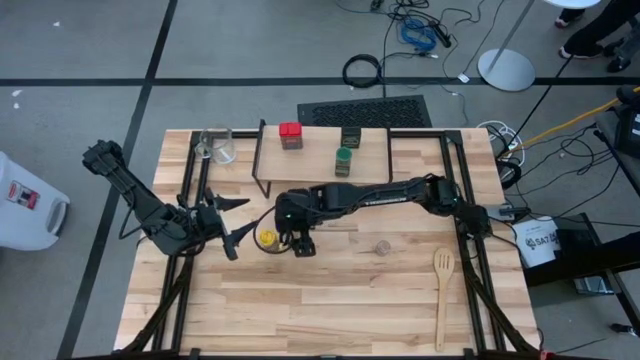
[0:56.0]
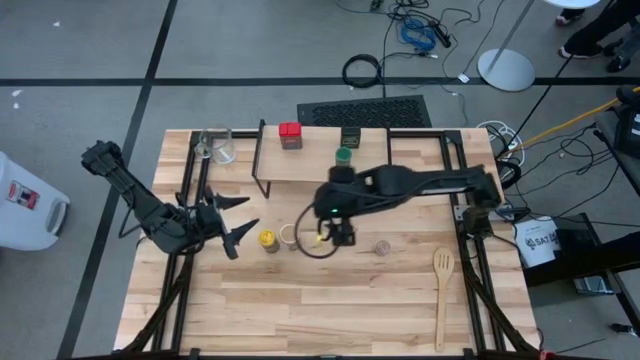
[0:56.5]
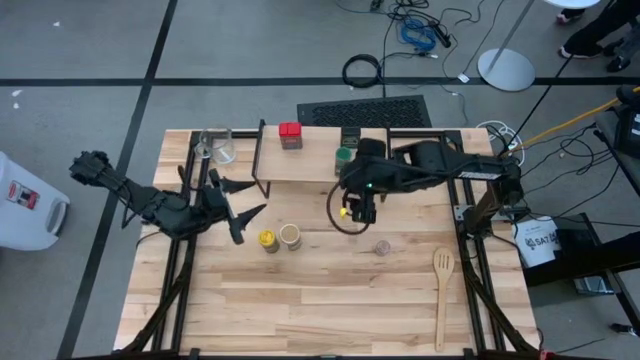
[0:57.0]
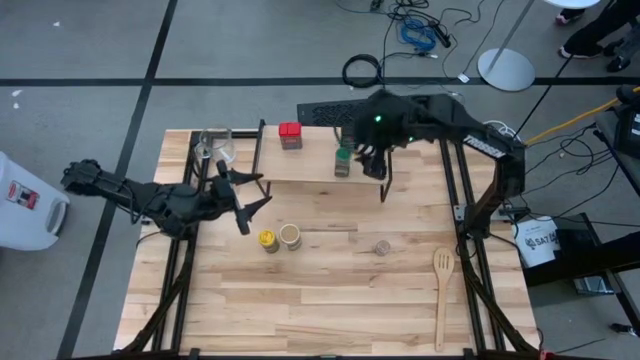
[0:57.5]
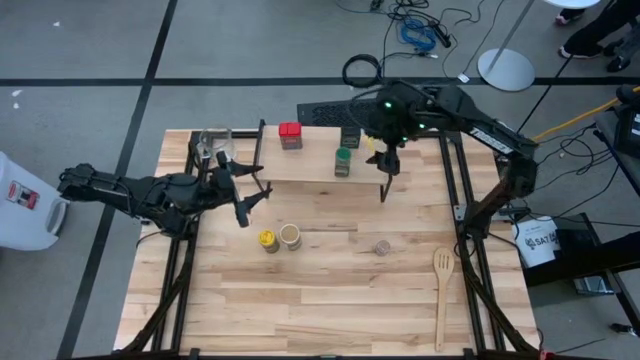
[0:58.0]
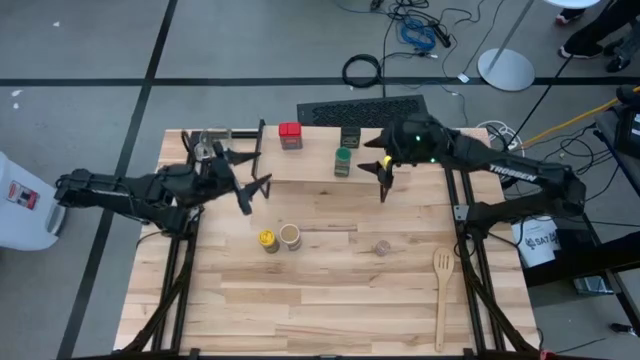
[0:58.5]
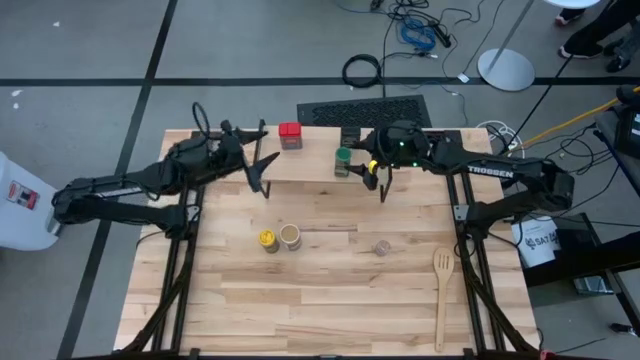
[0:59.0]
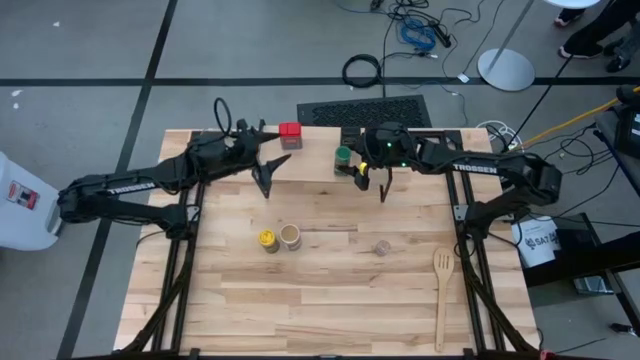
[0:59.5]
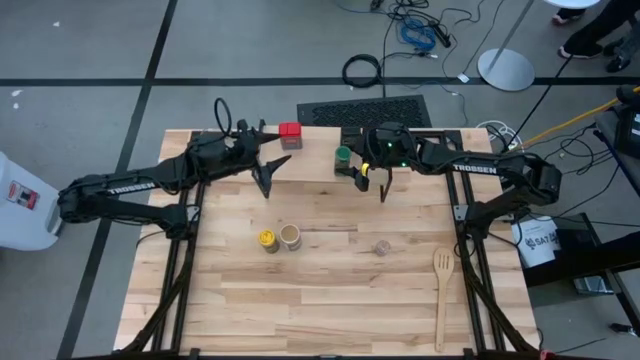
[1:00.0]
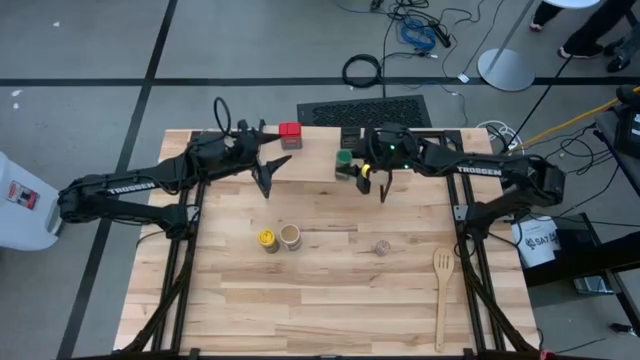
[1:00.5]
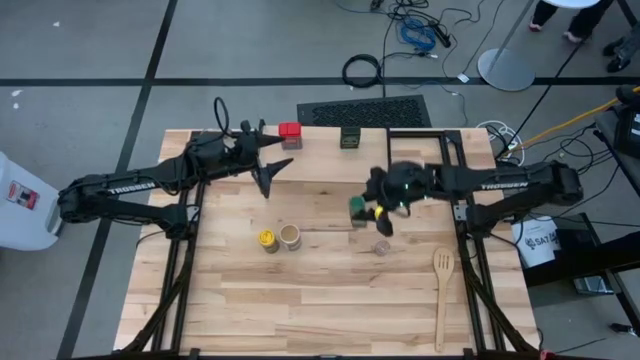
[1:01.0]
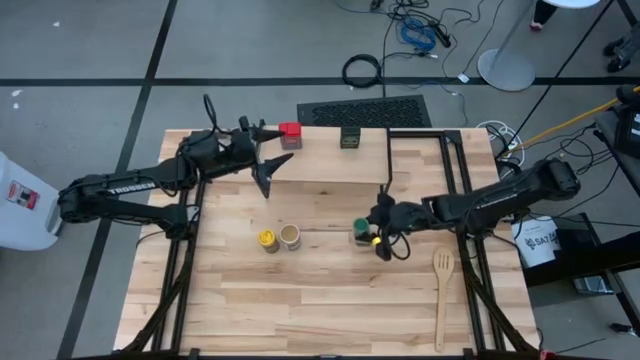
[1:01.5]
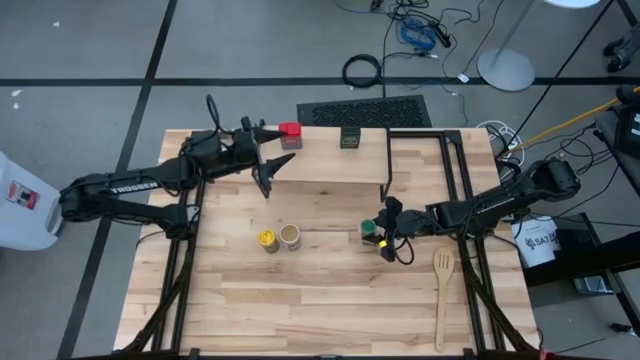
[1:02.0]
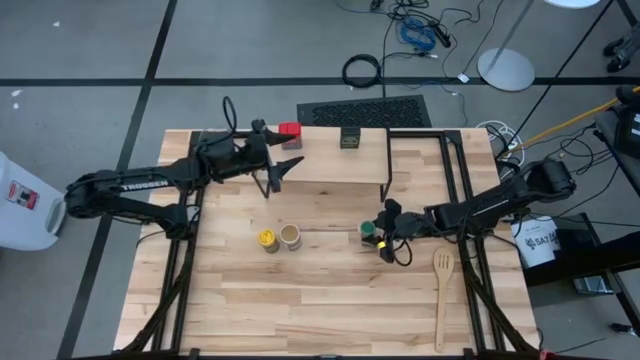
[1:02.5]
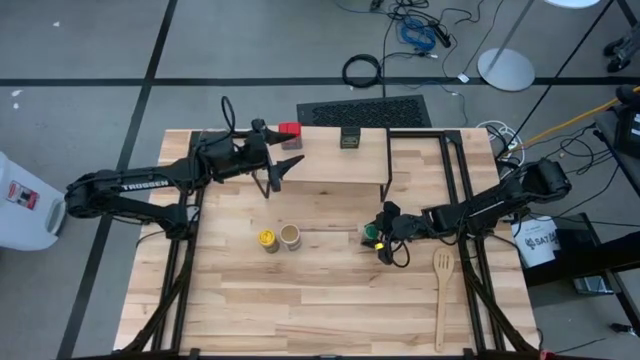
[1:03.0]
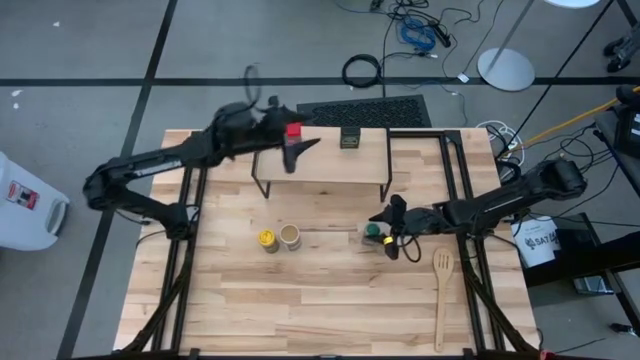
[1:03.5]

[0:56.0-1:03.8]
Task: Shelf spices
Remove the green seasoning bottle from the shelf

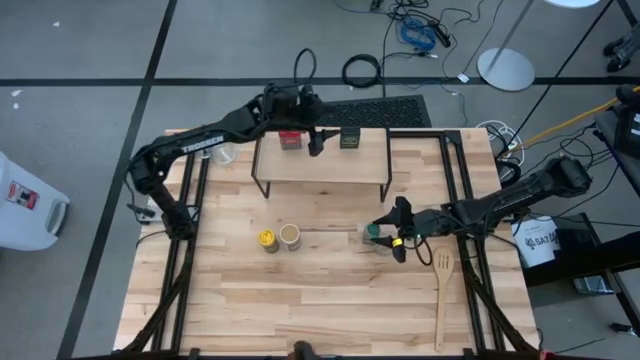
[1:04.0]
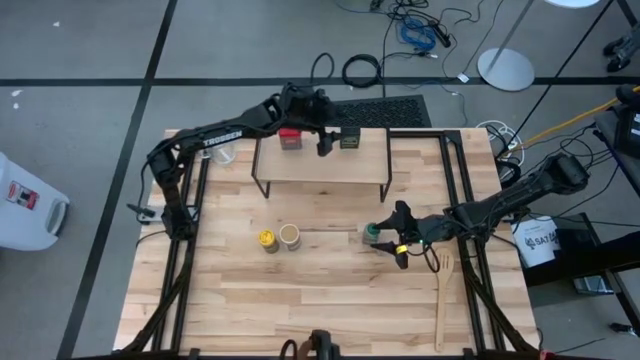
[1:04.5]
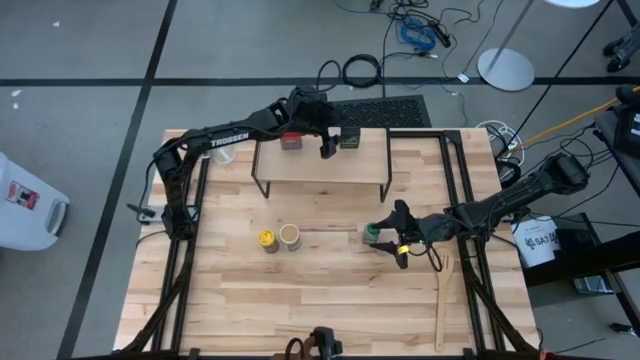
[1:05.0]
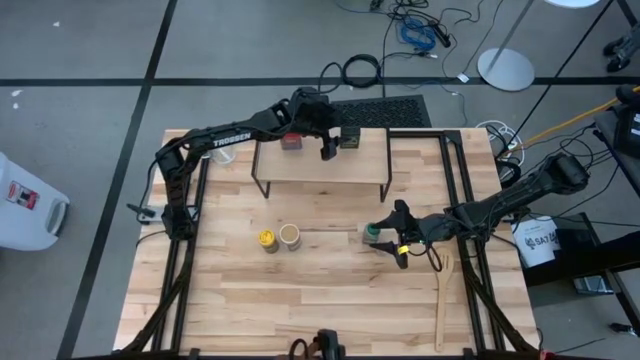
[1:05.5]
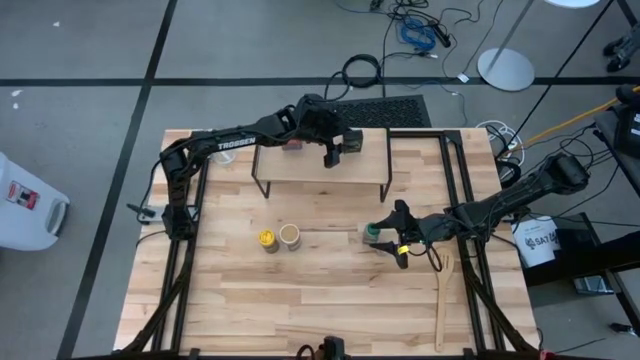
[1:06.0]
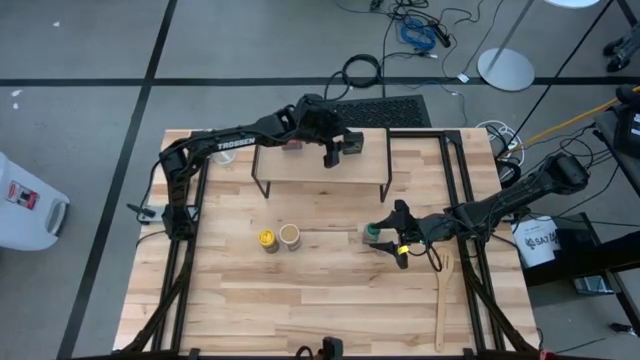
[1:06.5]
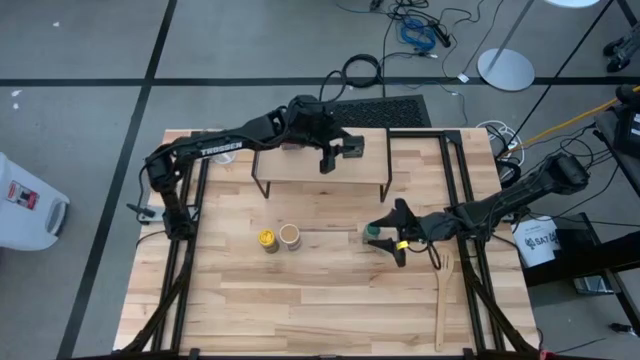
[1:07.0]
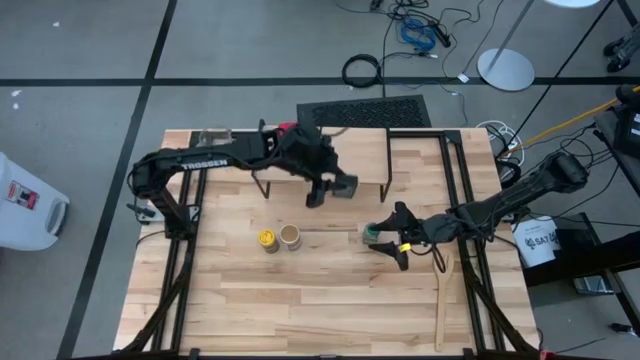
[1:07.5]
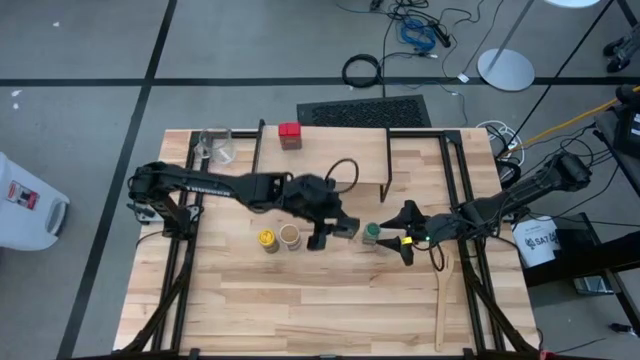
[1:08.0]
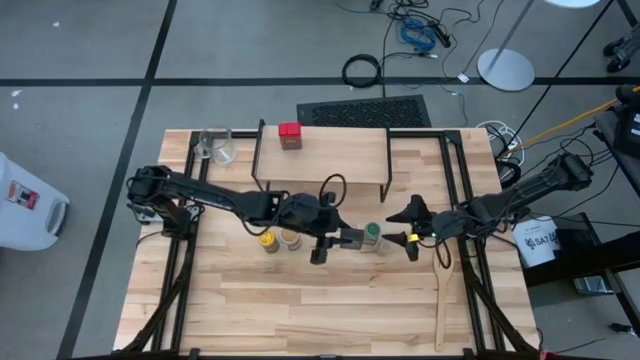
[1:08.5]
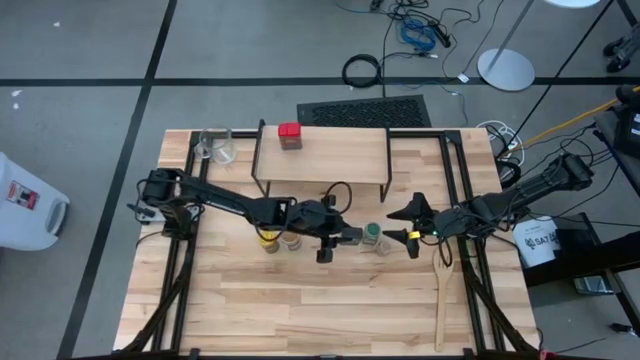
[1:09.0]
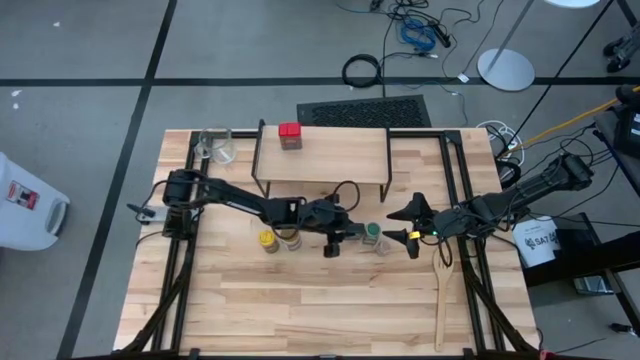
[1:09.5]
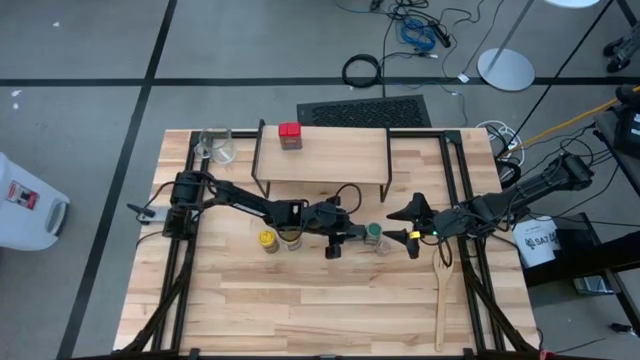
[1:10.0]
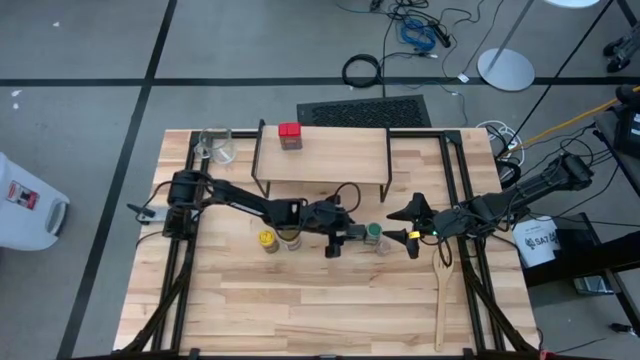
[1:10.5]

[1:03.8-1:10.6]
Remove the black seasoning can from the shelf

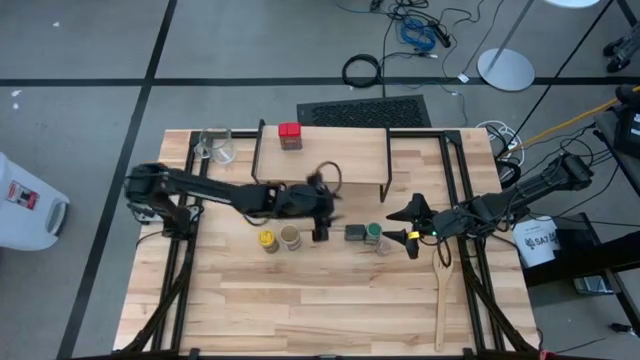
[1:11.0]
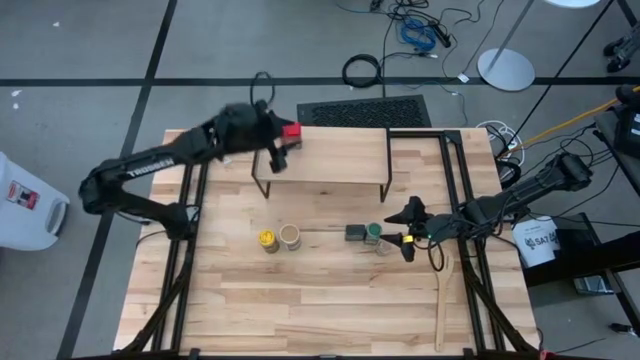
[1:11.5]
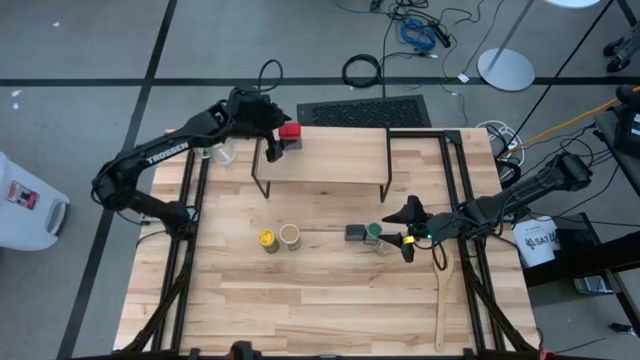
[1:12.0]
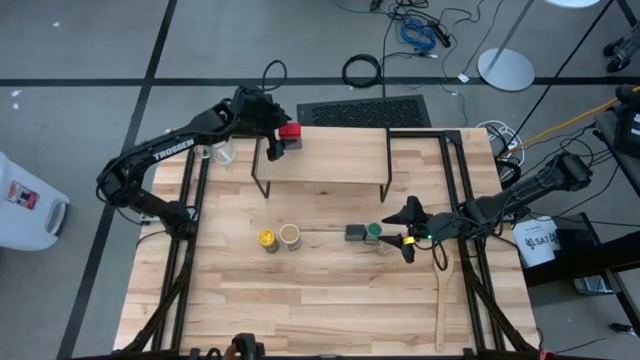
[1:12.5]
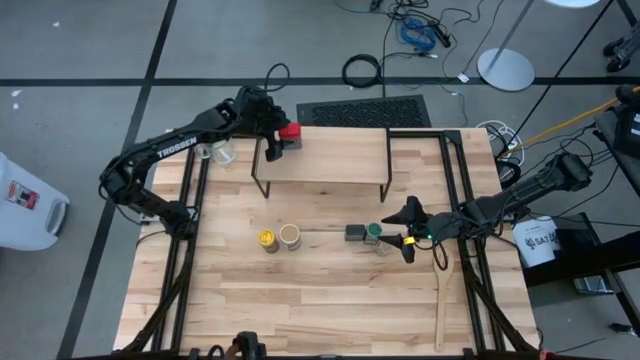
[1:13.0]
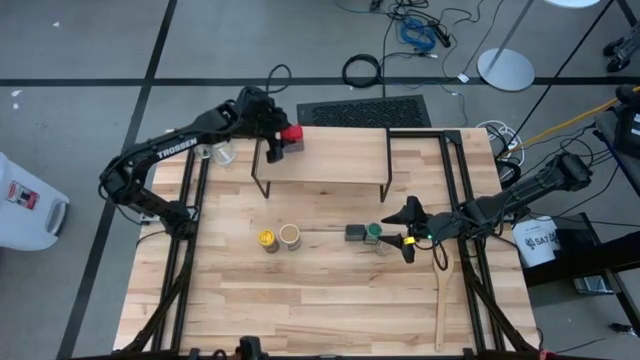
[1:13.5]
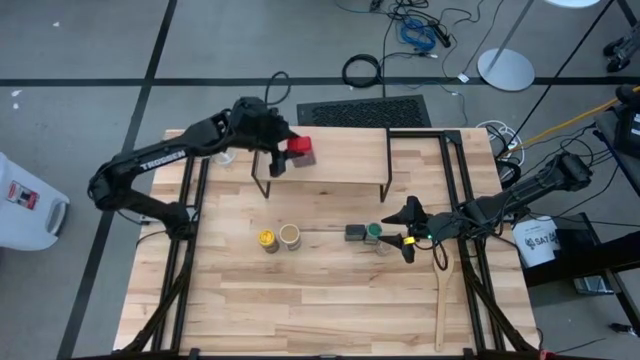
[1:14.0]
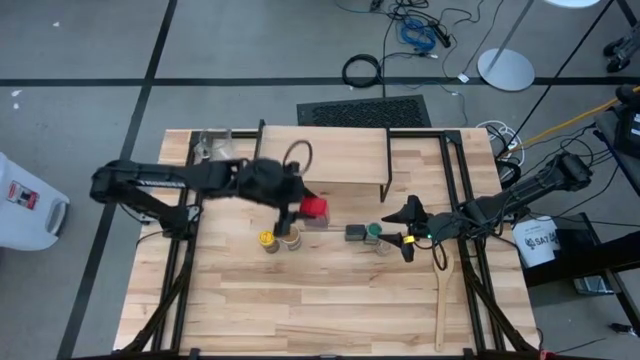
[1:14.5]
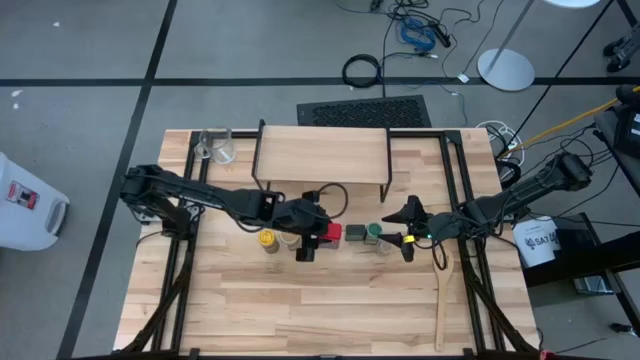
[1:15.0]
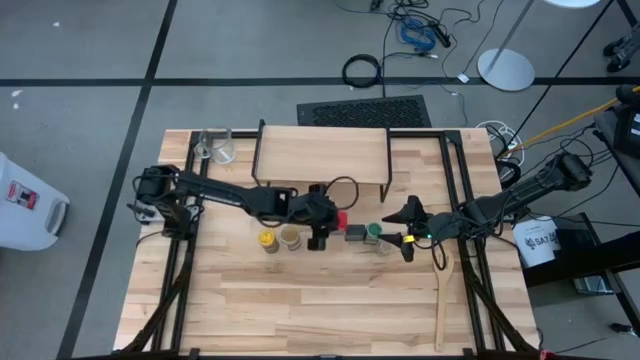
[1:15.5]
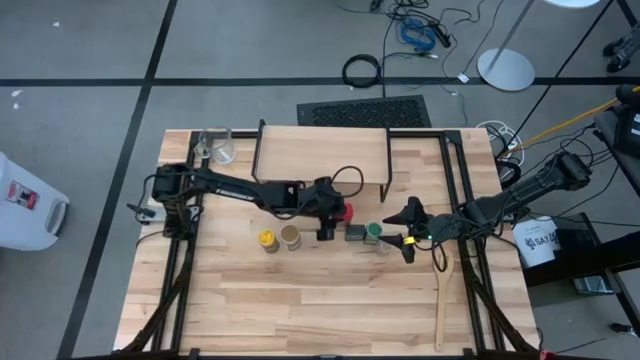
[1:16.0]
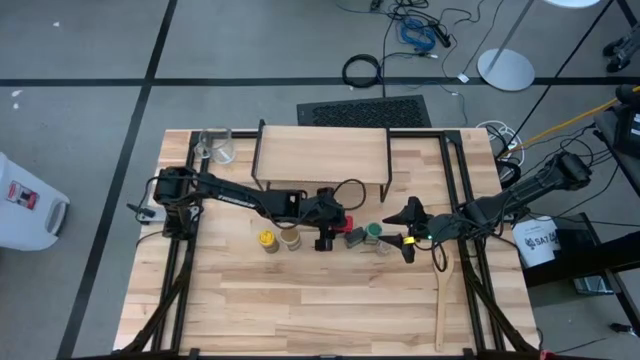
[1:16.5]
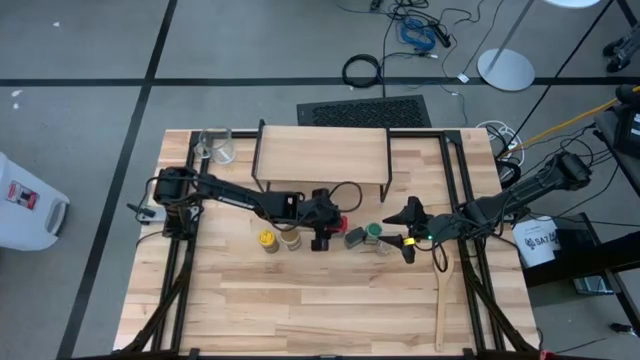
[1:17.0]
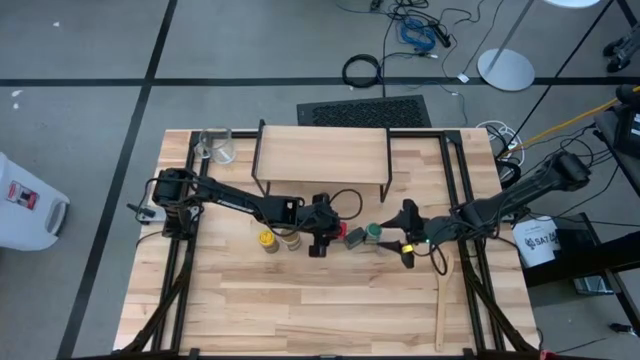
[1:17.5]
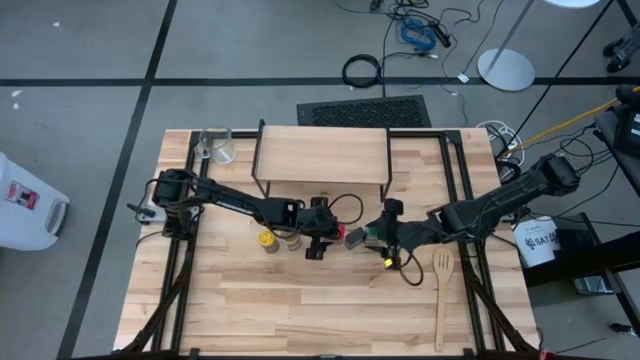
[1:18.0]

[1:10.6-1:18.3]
Remove the red seasoning can from the shelf

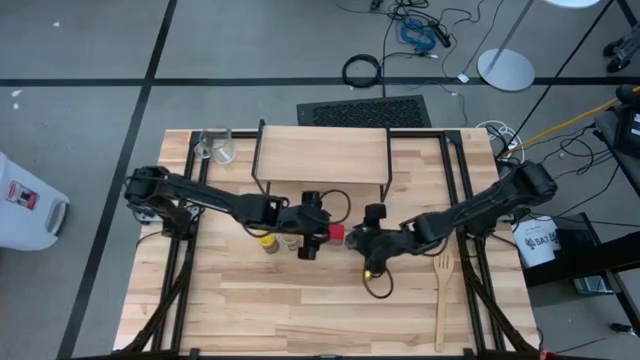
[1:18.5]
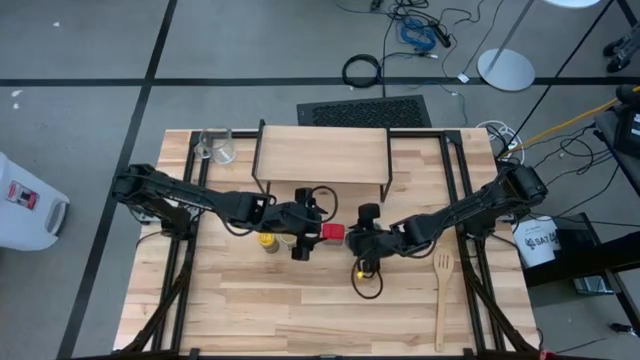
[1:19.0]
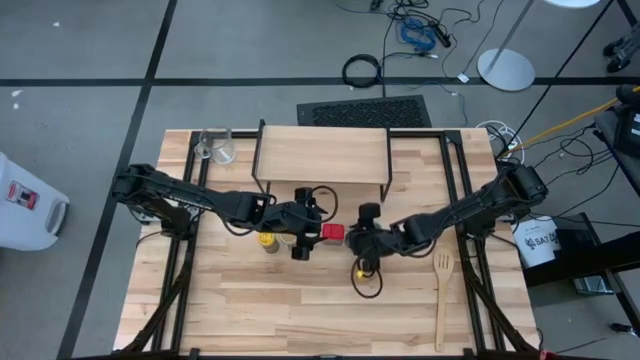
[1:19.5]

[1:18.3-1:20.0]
Adjust the black seasoning can
